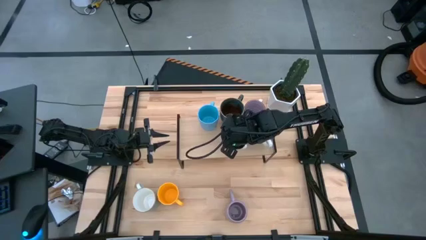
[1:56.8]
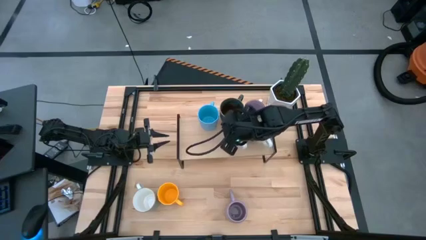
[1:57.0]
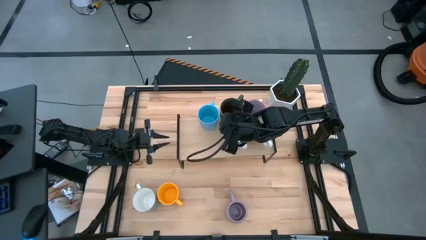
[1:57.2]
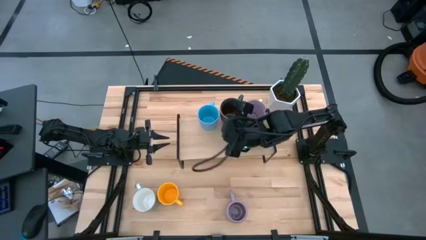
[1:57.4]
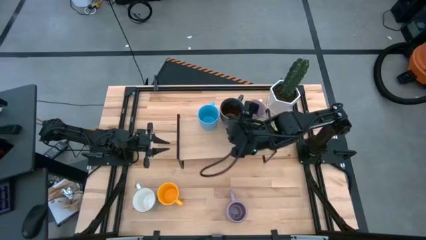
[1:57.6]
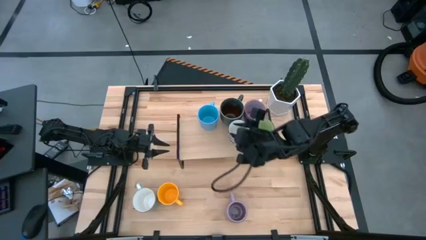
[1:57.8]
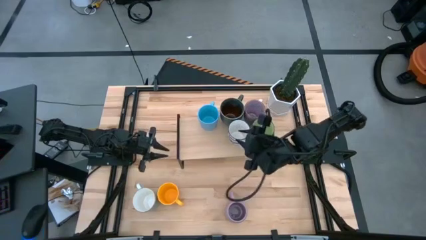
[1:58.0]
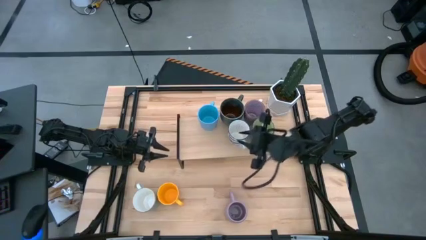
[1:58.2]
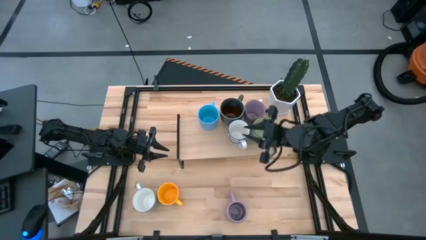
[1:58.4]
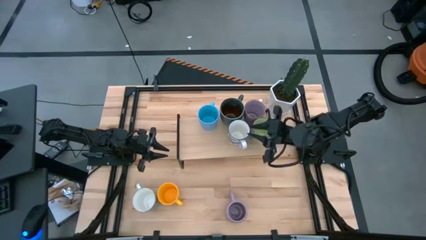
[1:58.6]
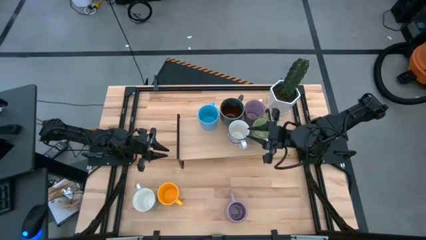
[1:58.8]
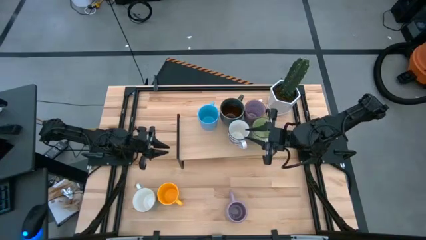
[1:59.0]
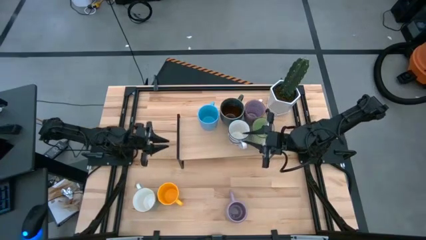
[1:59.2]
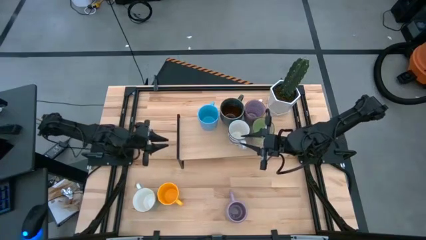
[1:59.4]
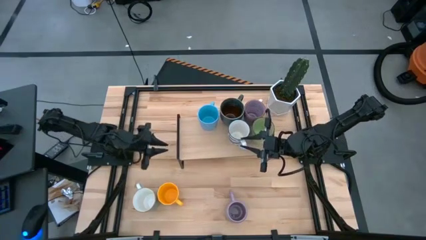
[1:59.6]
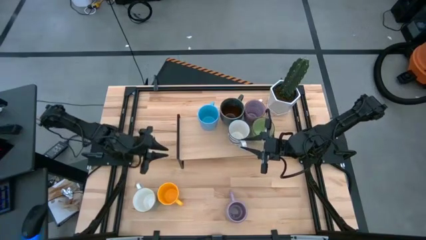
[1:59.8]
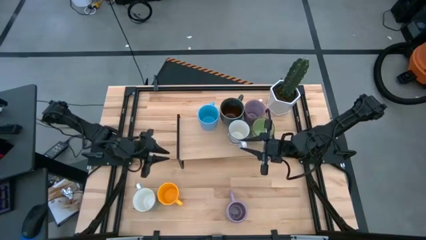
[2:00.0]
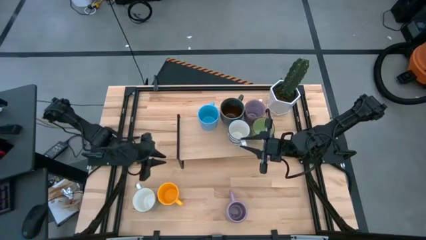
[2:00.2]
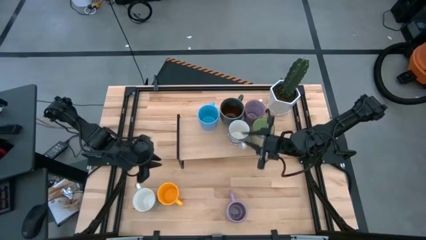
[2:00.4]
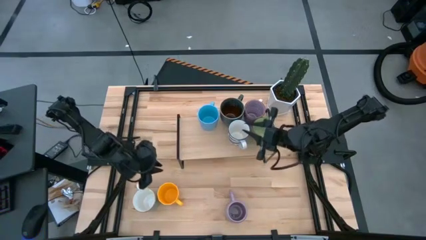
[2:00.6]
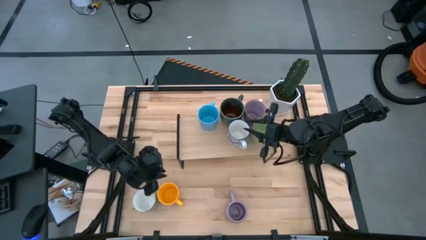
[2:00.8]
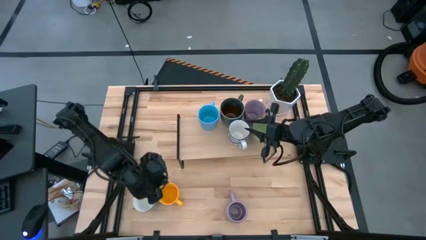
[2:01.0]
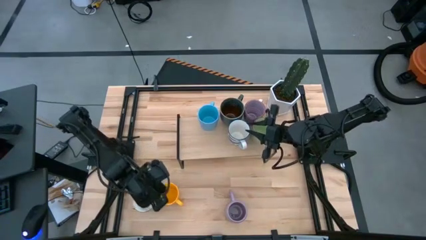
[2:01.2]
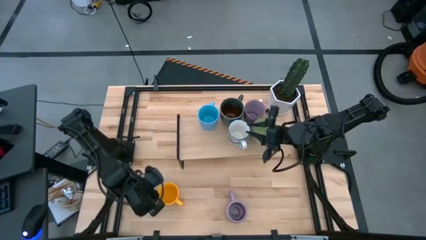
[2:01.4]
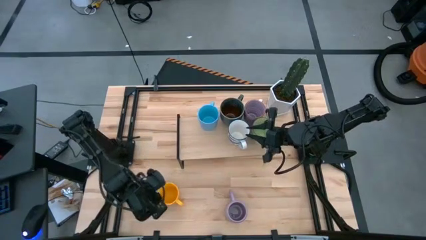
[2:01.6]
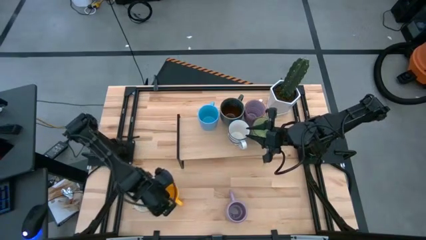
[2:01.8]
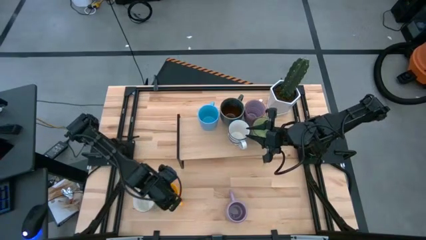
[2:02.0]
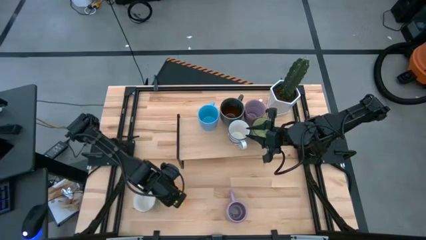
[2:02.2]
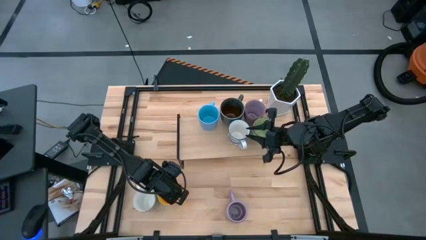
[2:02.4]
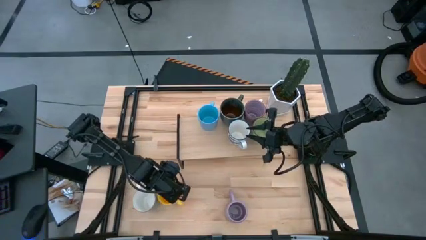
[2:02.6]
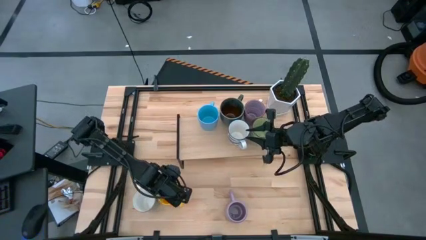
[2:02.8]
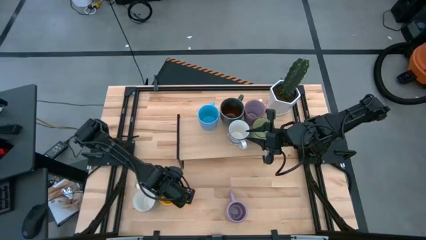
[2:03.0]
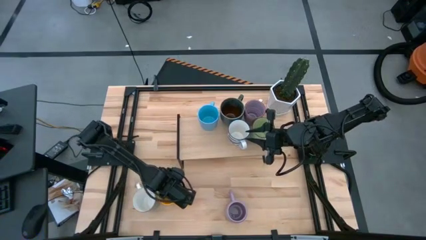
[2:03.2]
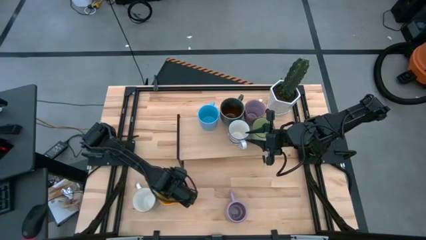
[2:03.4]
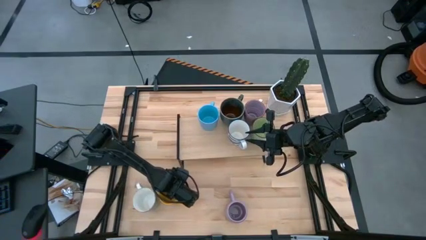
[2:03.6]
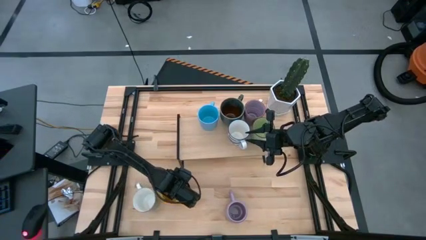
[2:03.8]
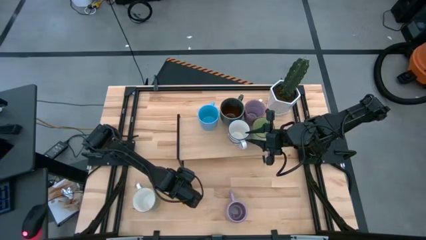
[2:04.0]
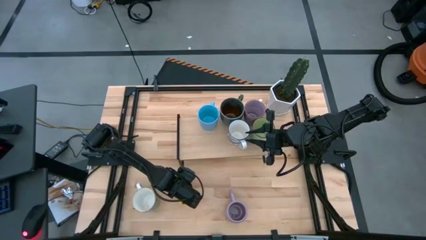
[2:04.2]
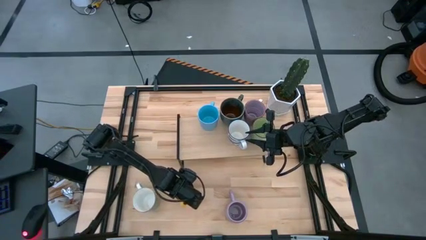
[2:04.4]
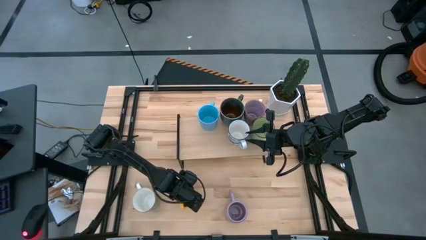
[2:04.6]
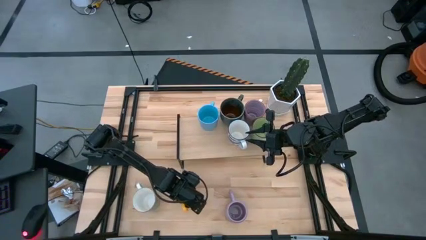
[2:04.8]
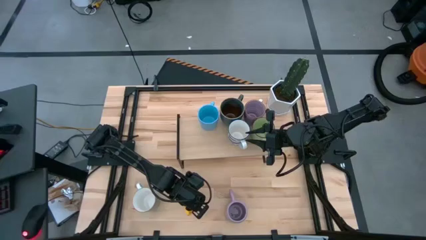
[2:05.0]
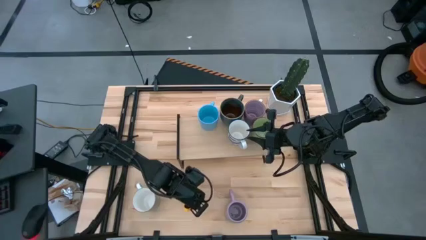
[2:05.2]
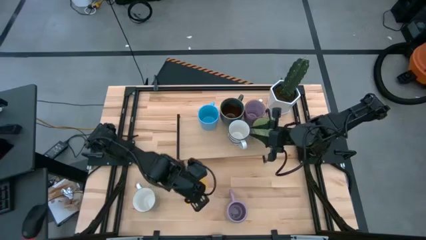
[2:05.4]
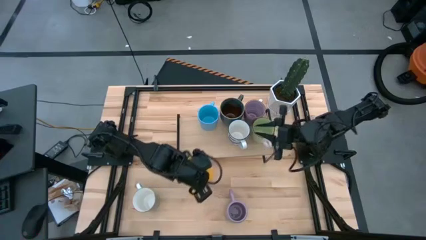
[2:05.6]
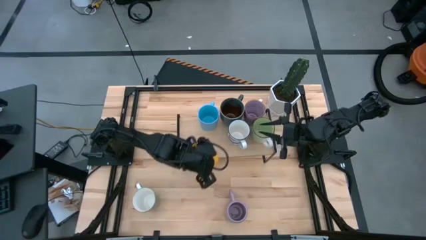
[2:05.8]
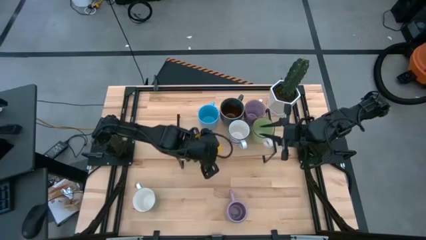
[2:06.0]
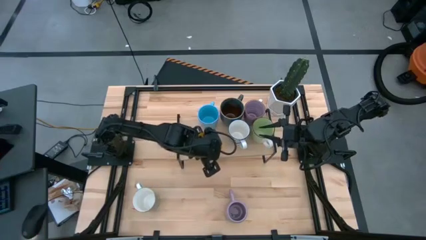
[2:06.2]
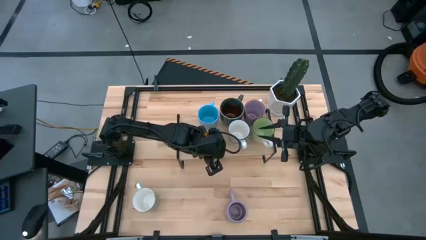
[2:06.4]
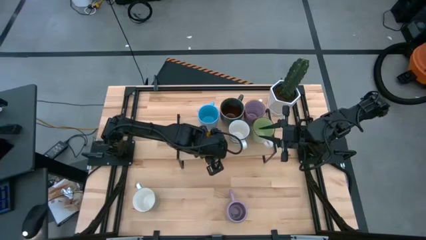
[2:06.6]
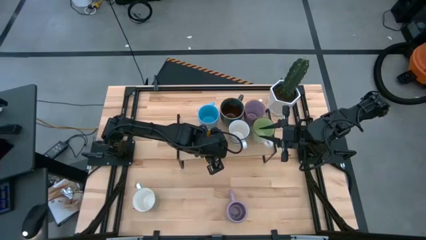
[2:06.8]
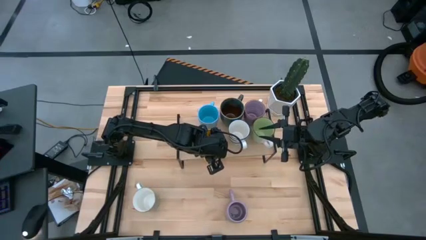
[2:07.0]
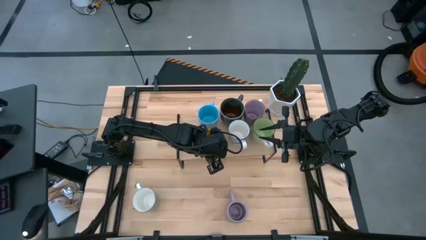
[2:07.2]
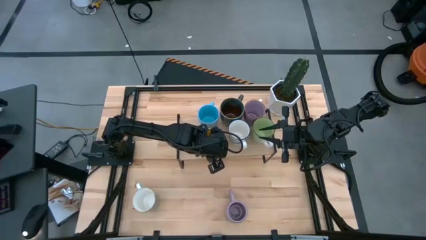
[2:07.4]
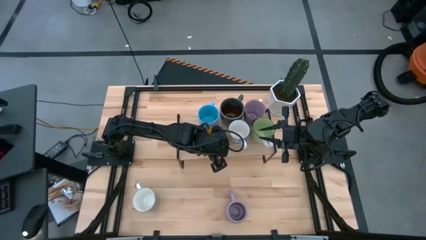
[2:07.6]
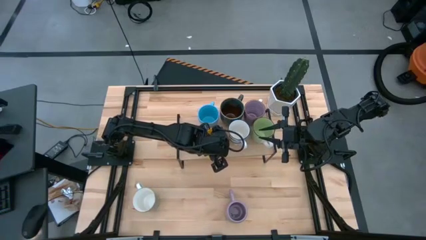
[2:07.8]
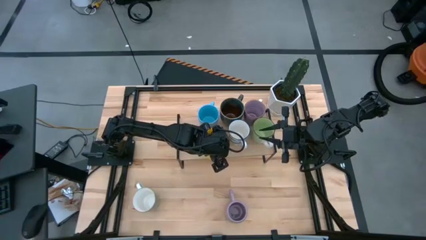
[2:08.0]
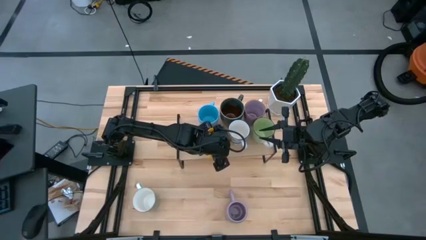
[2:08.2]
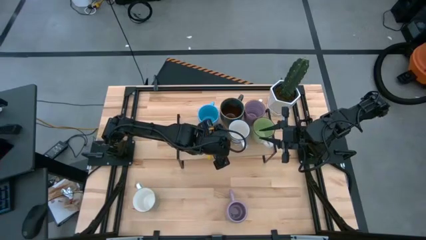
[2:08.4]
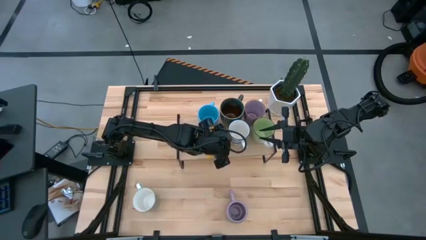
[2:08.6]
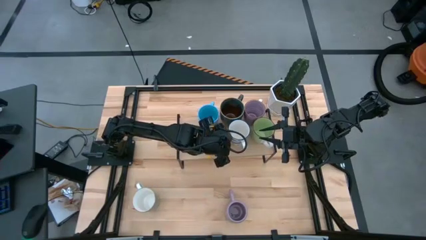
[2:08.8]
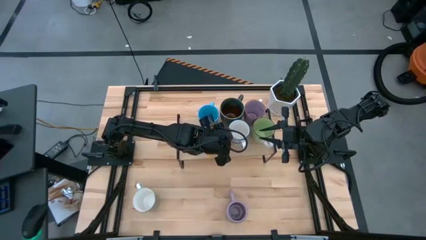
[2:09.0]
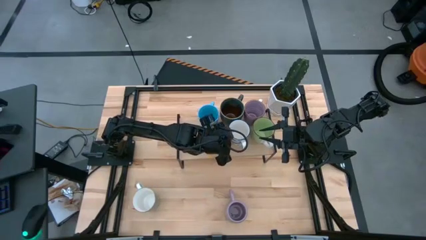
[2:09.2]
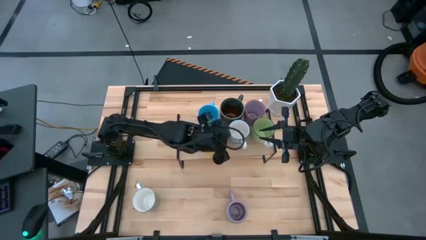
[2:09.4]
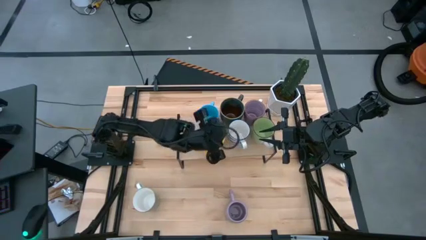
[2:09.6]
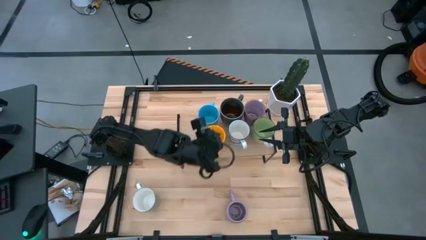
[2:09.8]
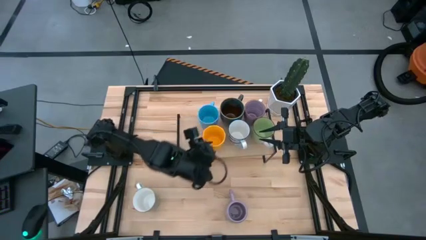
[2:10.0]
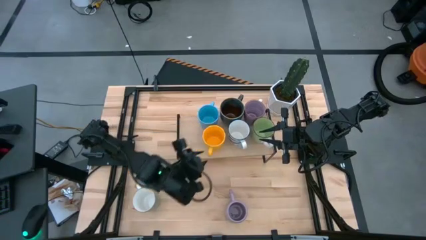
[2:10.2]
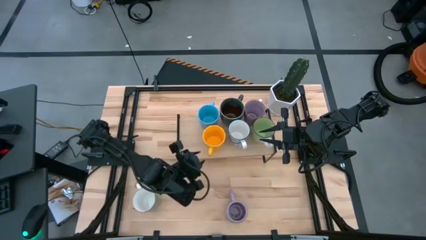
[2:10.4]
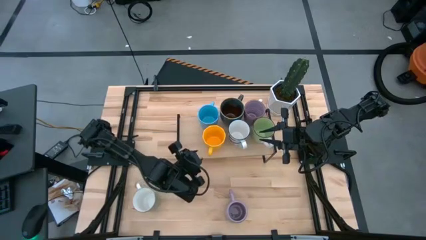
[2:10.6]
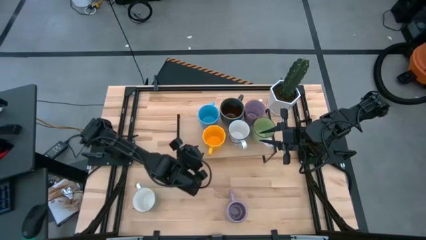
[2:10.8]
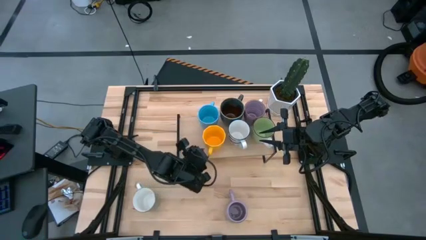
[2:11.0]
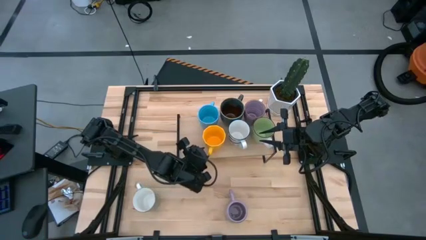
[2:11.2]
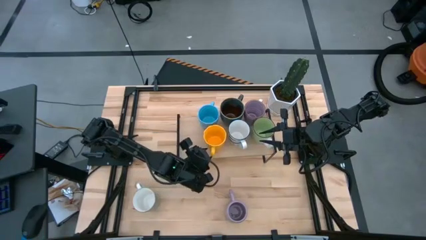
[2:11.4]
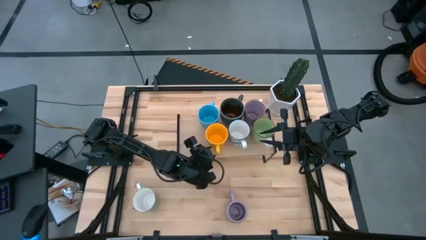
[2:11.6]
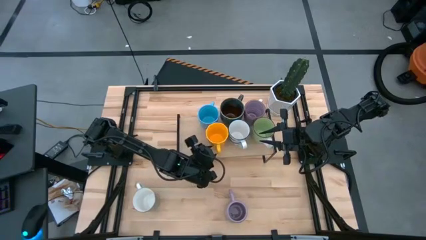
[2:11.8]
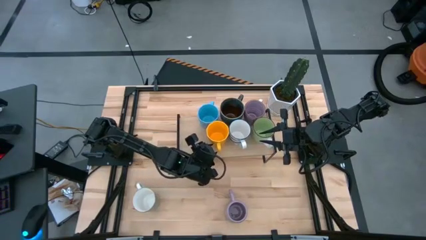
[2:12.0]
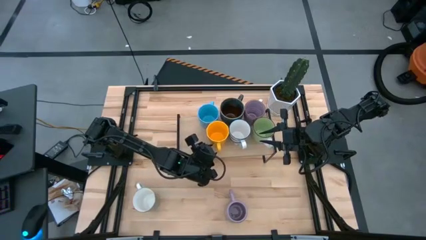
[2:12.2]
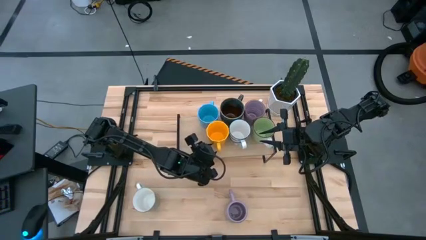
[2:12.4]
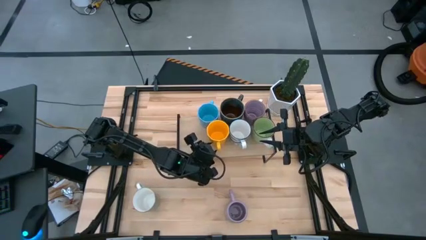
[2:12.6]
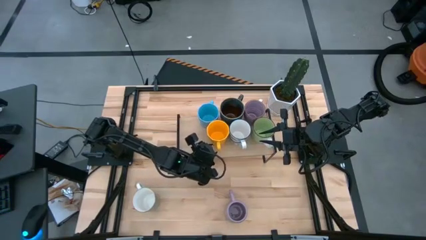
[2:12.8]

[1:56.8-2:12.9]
Task: Place coffee mugs
Put the yellow mug on the shelf
